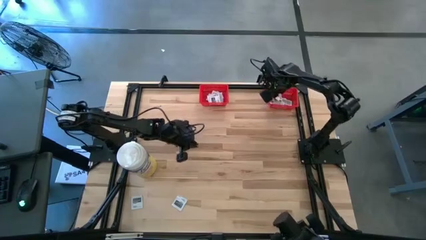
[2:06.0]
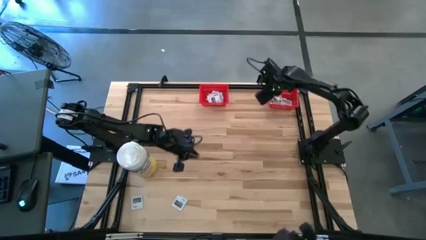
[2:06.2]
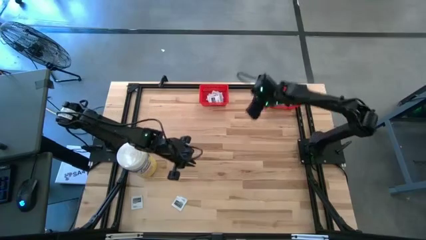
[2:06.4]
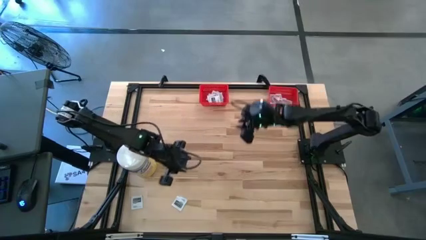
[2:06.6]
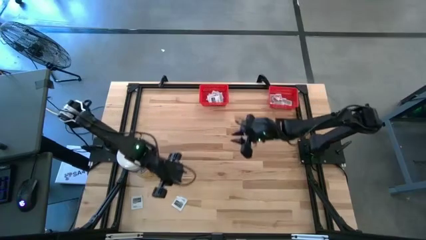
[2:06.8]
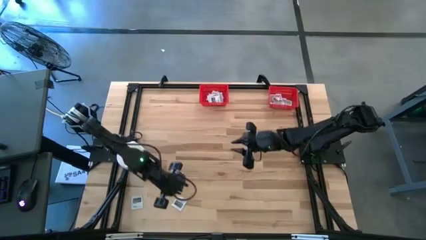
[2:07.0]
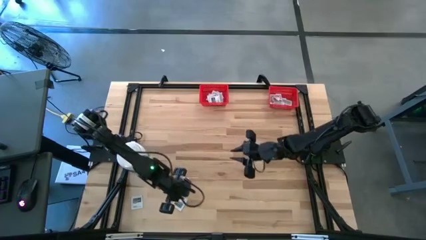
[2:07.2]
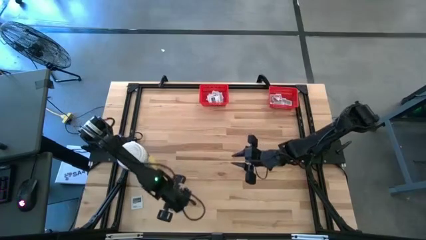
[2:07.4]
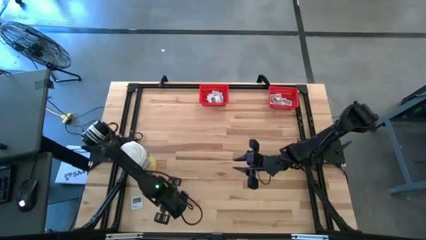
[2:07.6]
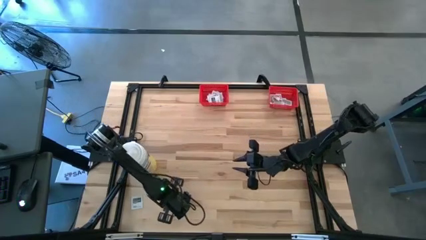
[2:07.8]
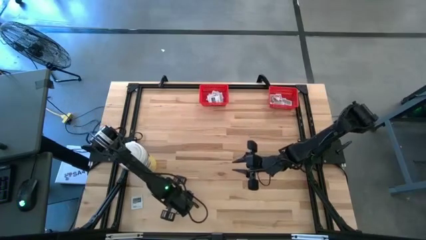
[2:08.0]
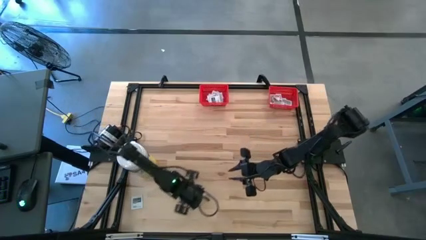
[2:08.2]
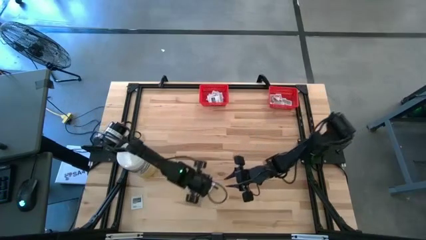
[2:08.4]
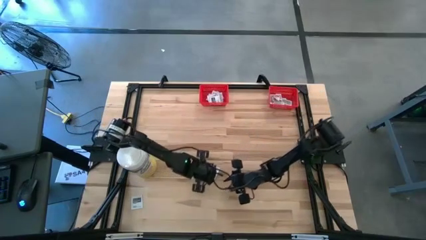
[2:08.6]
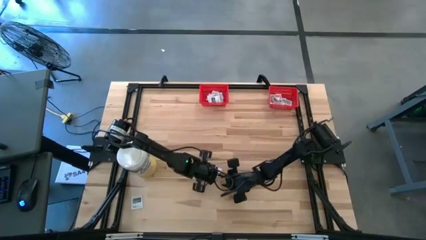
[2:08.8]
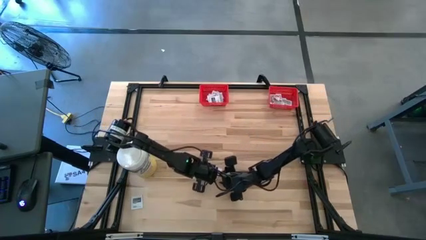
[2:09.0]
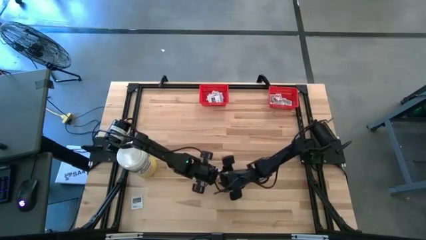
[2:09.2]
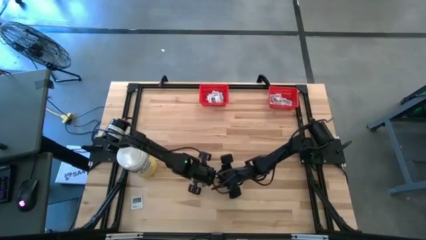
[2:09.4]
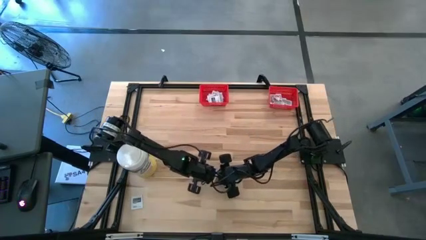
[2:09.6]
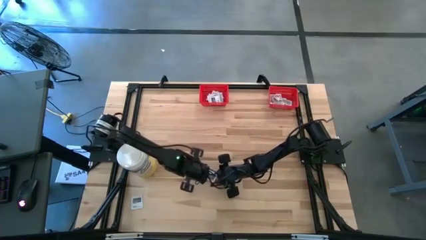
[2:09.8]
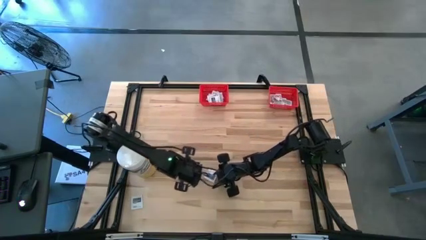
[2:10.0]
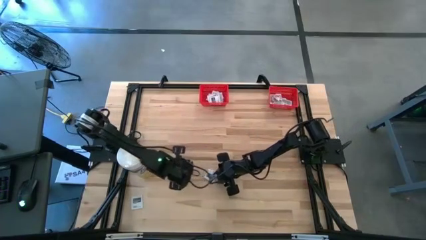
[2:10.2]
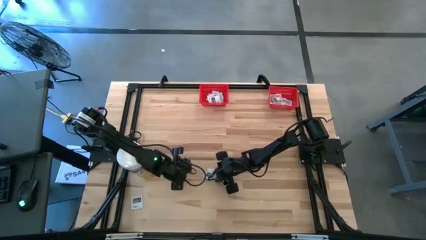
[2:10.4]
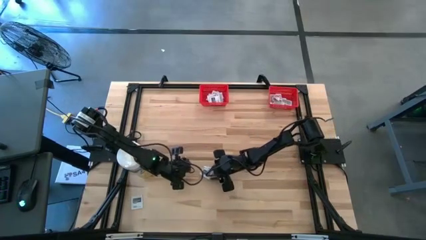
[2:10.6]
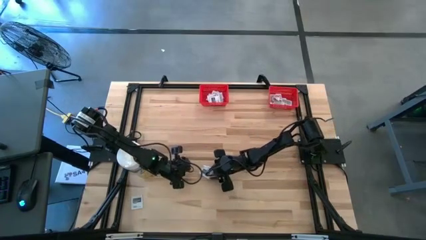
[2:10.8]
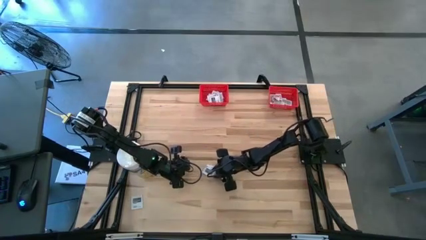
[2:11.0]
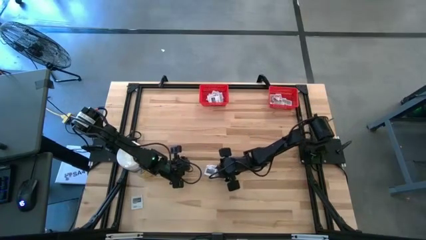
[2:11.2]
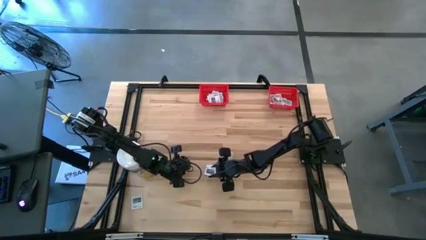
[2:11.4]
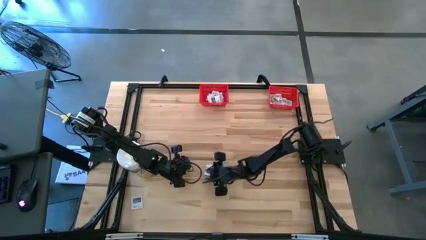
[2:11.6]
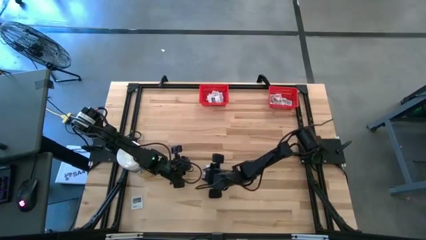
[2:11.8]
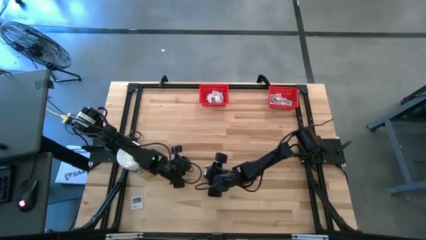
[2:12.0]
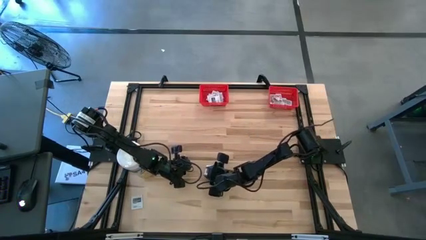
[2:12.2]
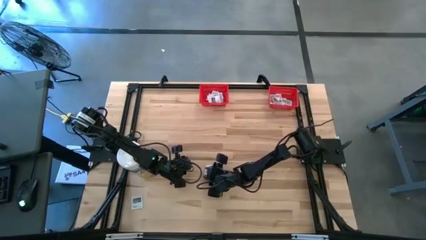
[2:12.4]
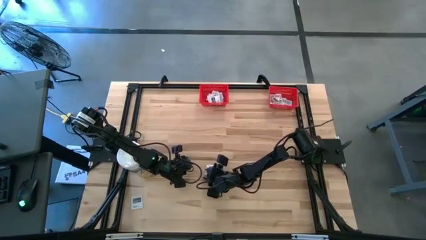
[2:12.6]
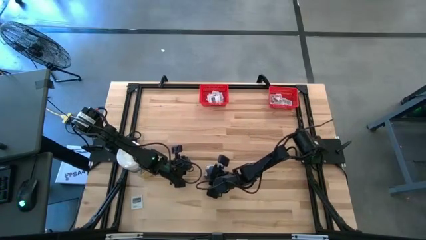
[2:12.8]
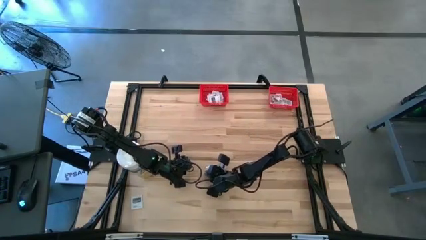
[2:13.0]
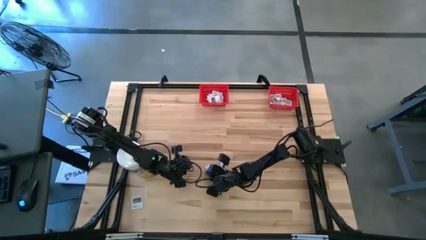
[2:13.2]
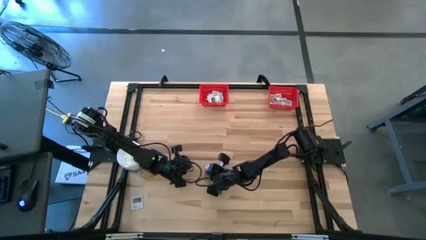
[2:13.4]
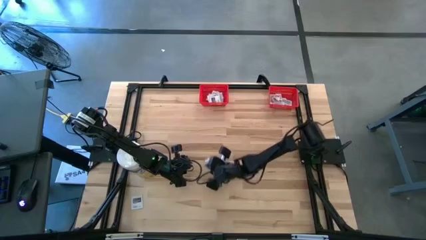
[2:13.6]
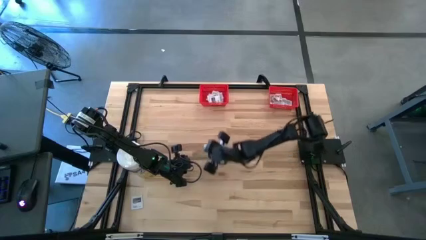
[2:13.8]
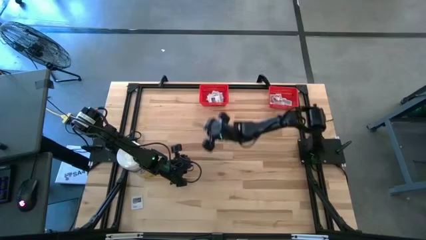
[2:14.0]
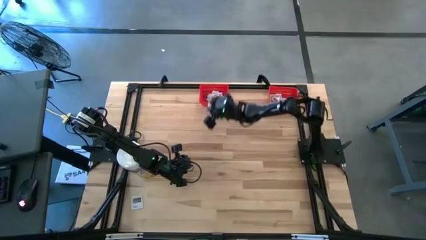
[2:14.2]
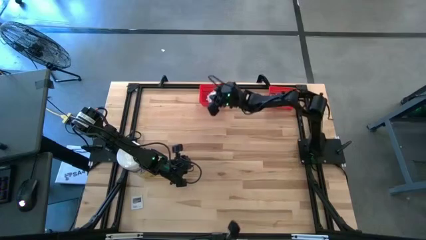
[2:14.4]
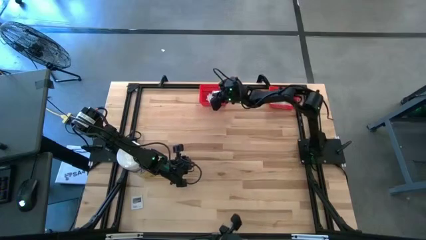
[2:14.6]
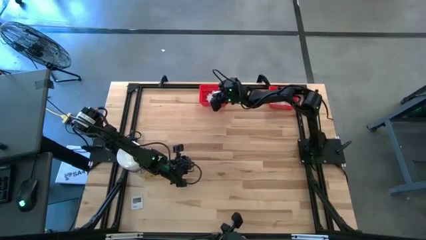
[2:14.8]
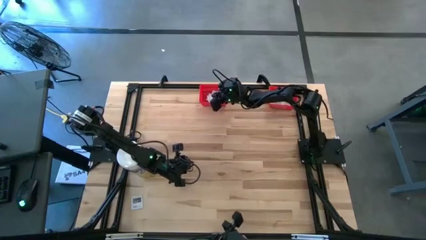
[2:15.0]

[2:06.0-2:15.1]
Task: Pick & Place First Aid Supplies
Put the towelette pack into the left red bin

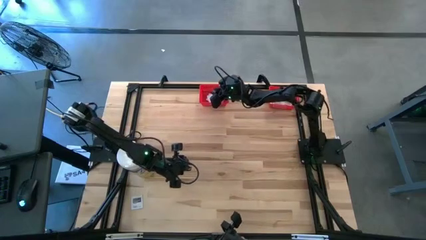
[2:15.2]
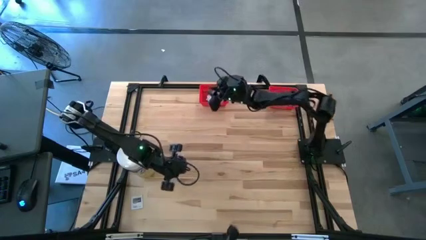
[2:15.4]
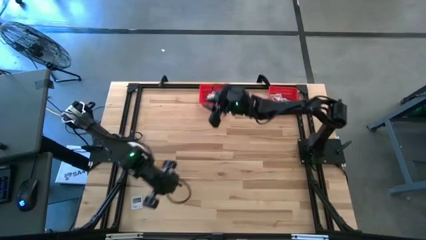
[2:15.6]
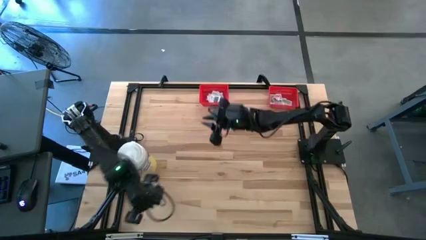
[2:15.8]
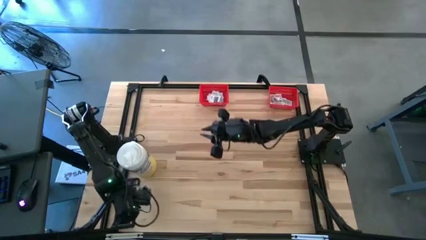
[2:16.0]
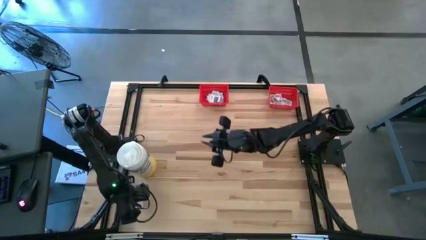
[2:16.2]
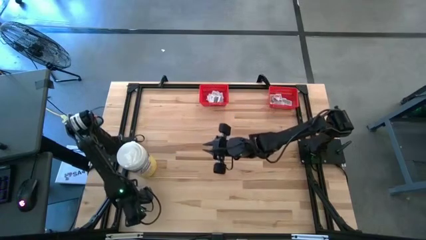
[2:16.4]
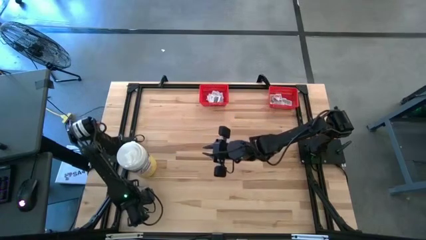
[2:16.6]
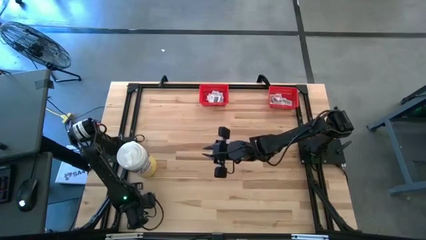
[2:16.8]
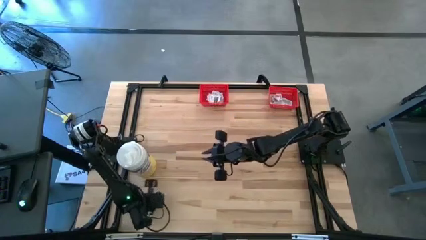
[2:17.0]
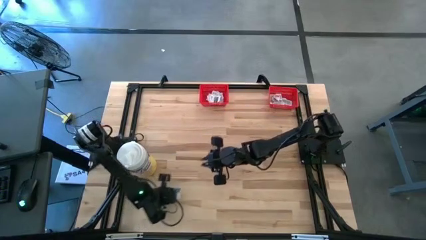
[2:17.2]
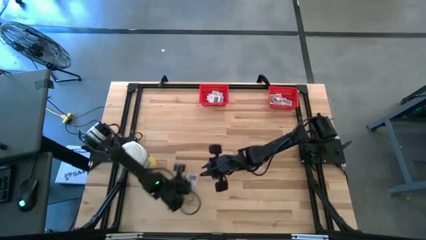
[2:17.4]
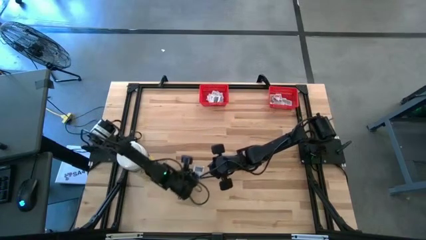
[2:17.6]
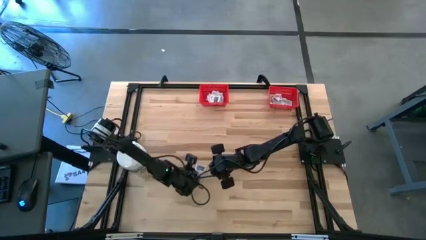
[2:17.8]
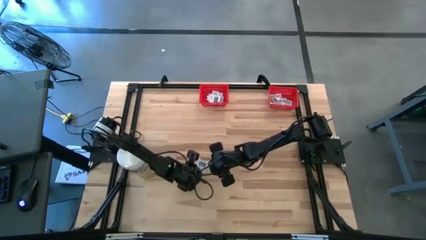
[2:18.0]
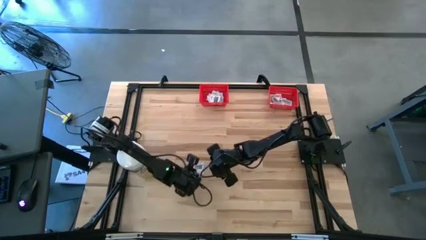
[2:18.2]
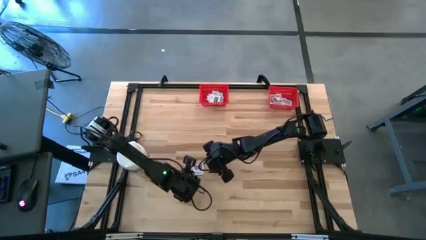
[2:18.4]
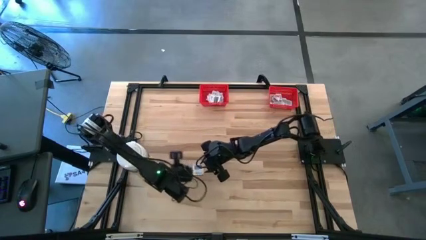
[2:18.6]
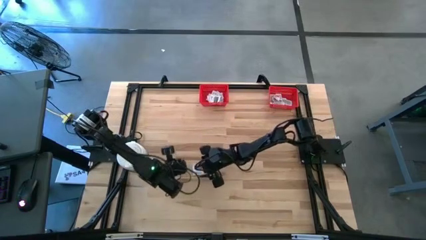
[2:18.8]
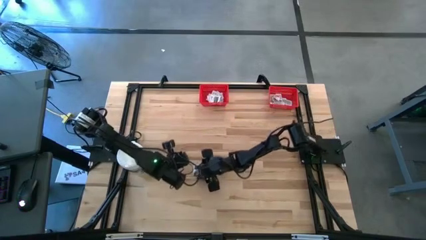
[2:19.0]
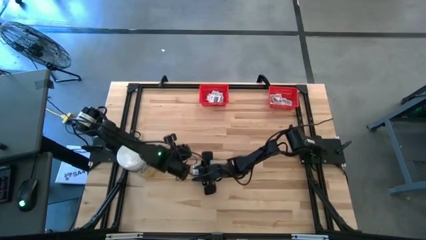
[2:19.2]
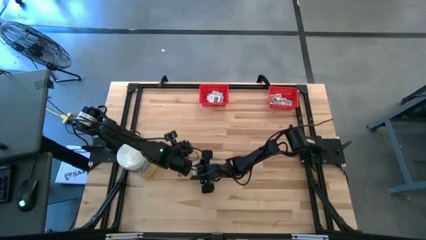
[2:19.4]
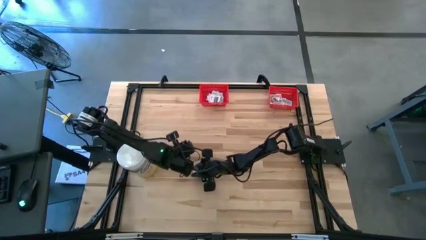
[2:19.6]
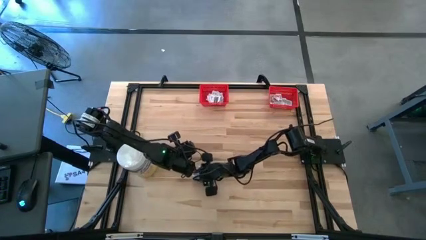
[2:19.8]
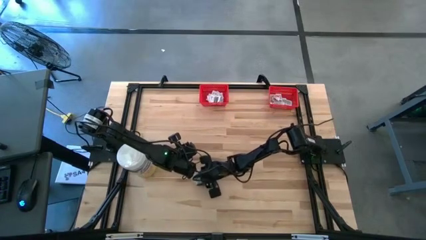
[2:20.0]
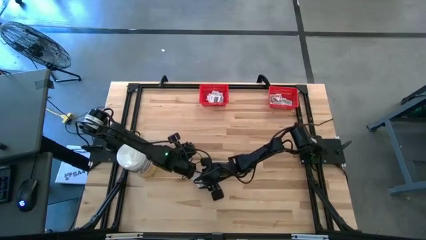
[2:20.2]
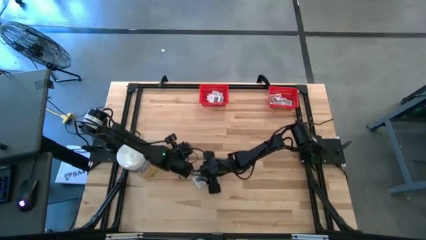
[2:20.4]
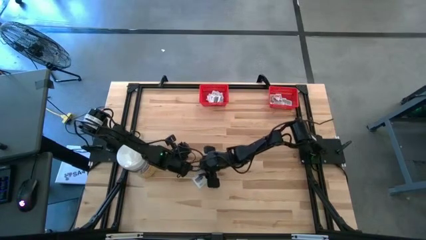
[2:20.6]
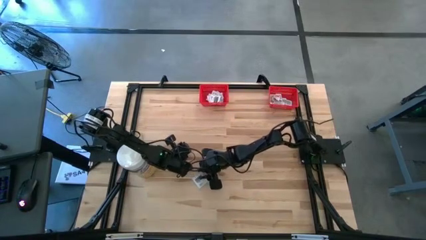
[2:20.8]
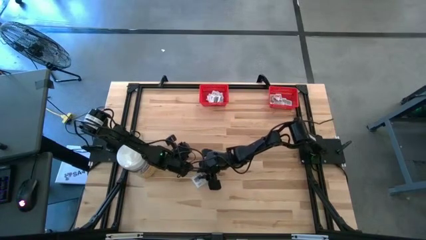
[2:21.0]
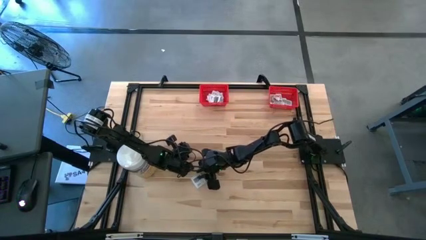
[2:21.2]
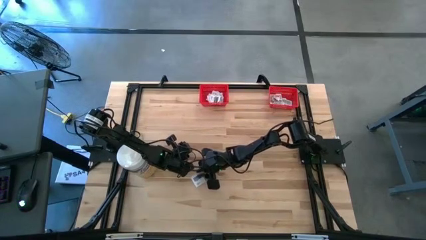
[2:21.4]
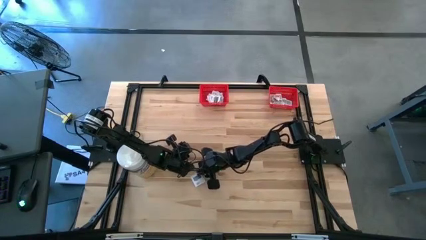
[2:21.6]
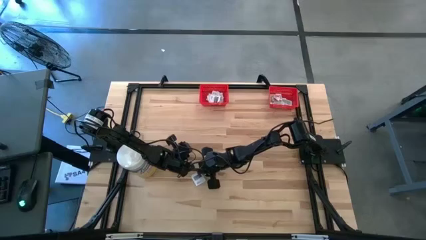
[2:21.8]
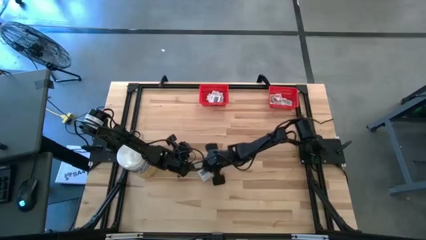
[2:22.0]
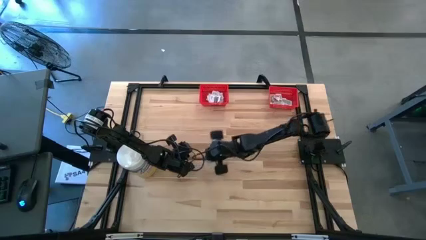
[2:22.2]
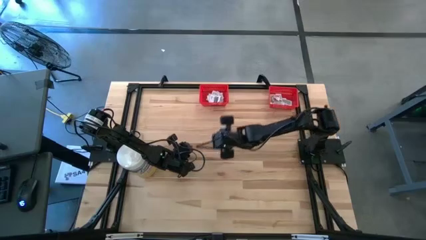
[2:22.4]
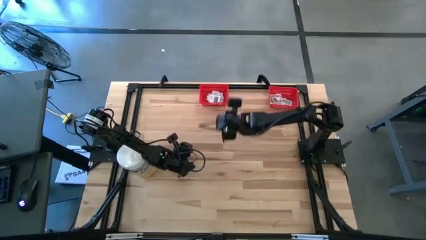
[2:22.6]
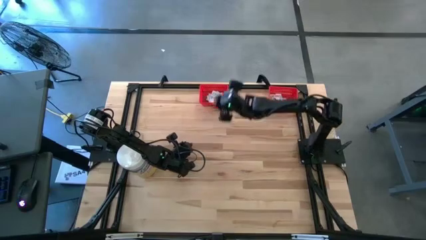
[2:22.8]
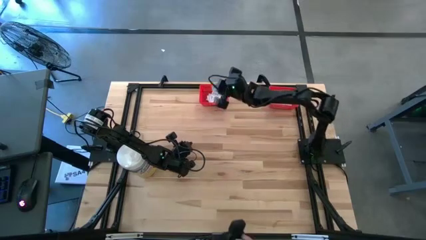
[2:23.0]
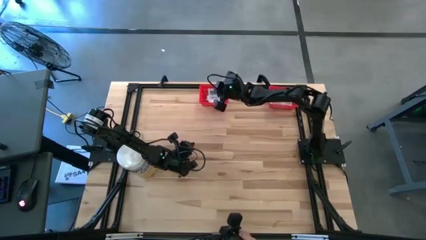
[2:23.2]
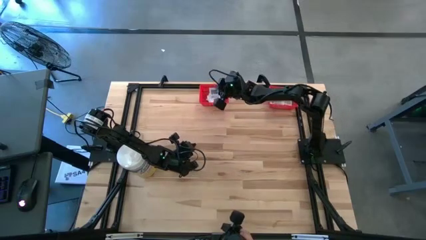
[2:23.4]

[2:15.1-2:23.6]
Put the towelette pack into the left red bin
